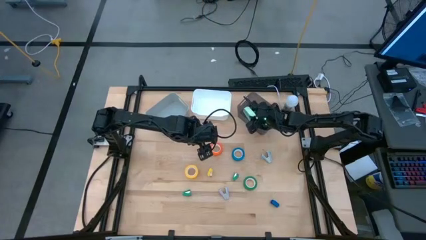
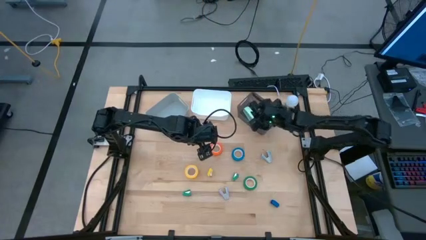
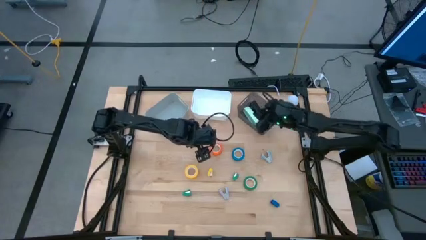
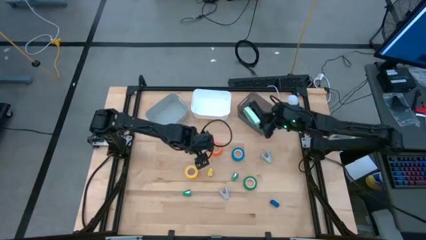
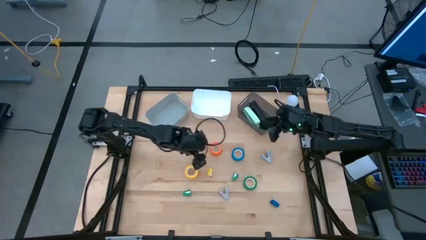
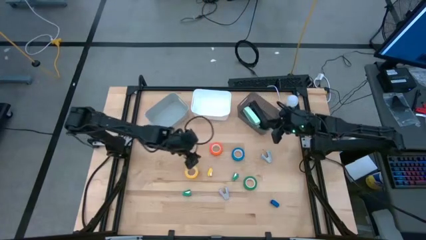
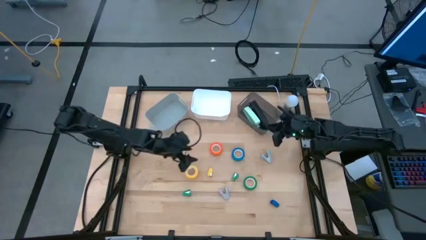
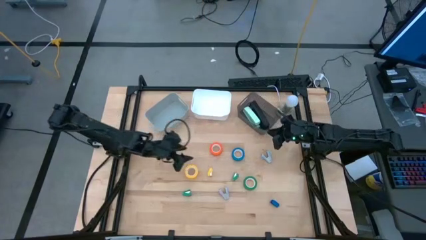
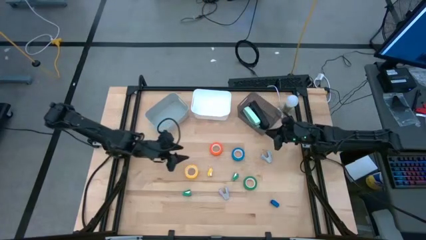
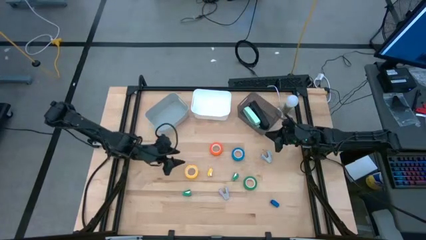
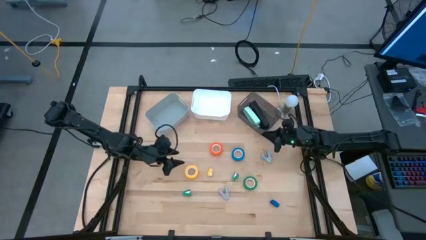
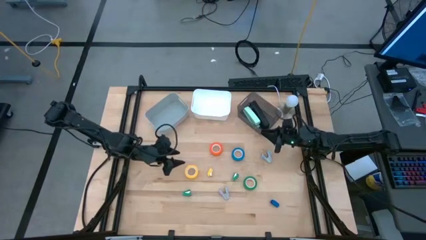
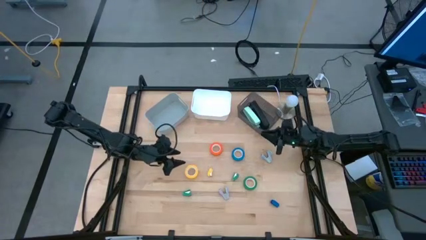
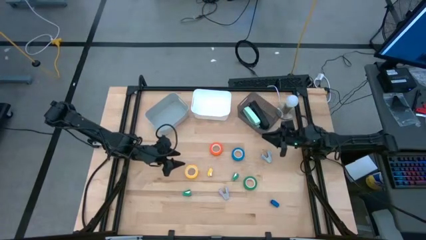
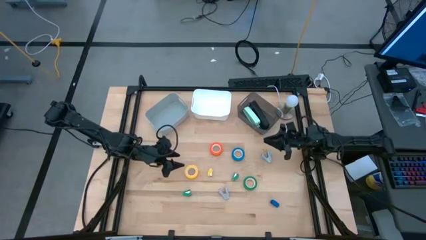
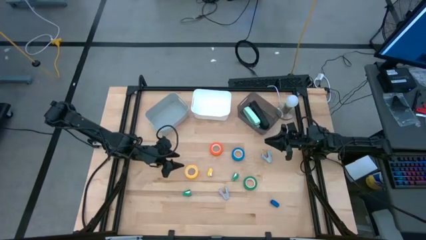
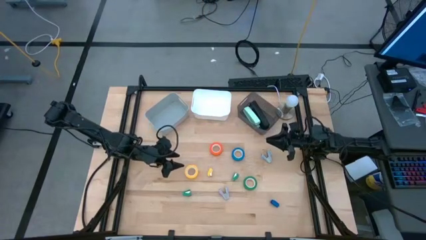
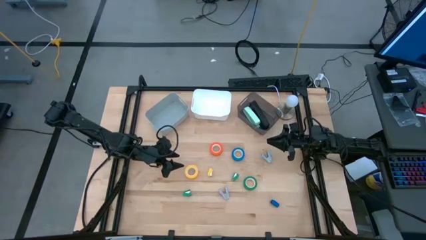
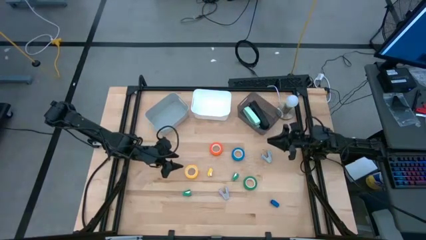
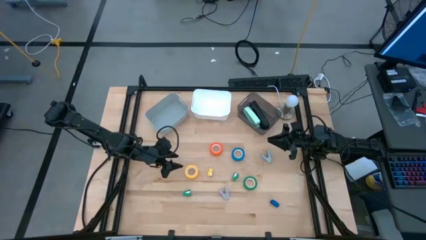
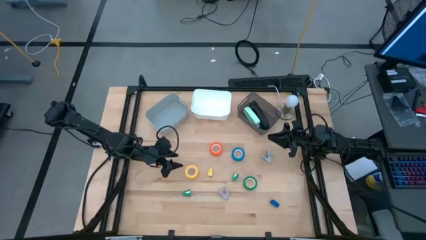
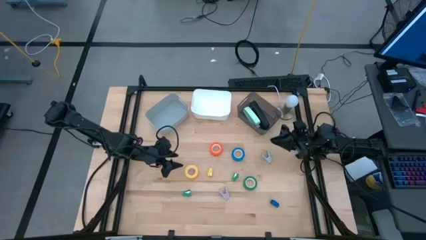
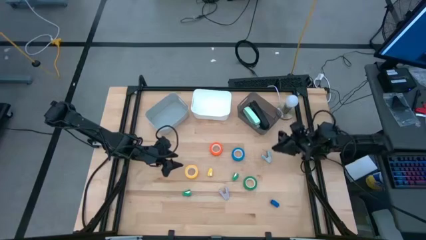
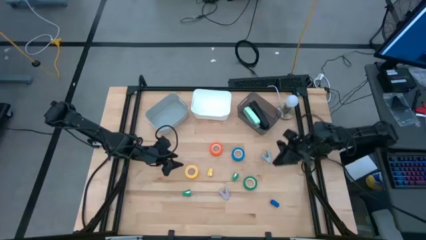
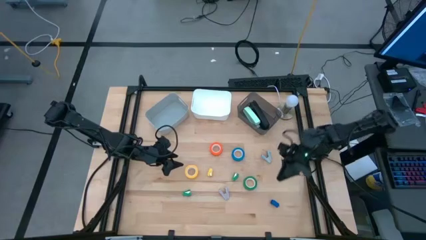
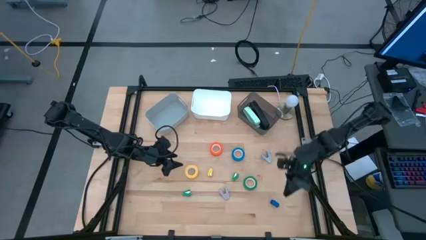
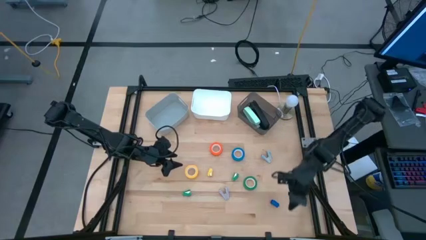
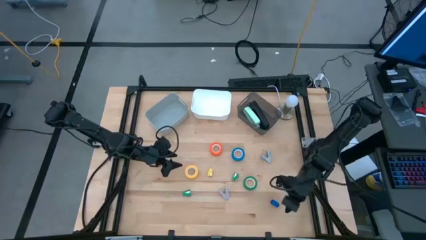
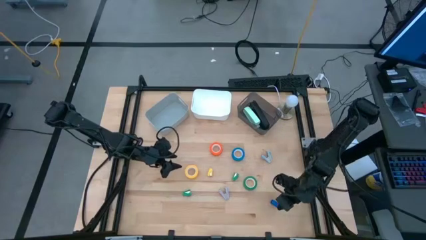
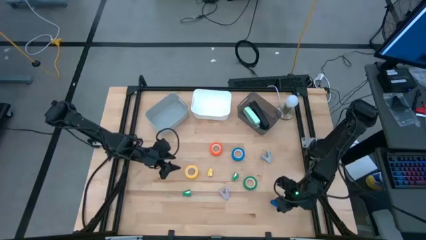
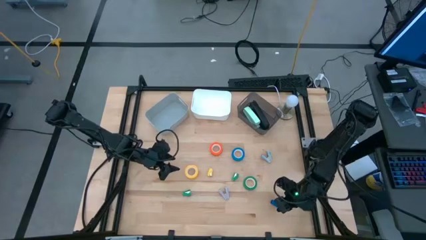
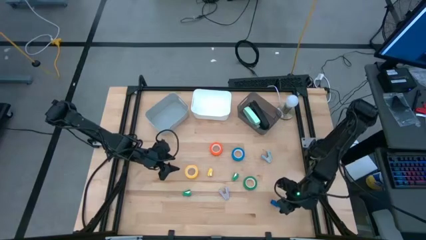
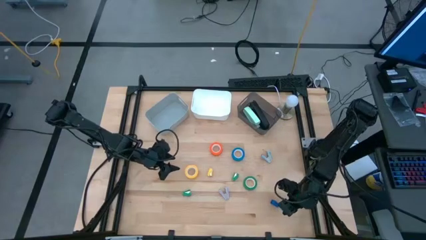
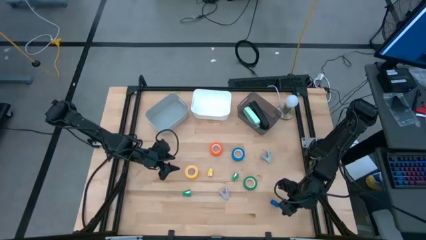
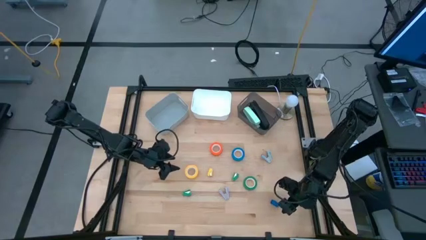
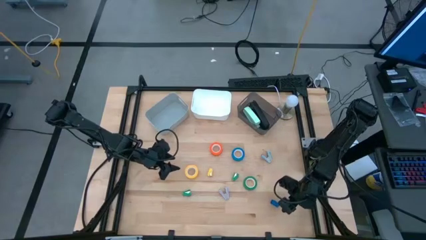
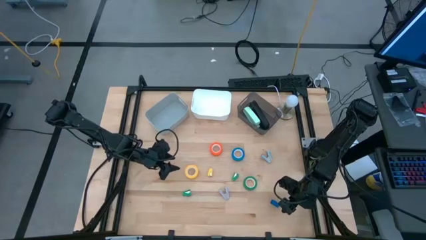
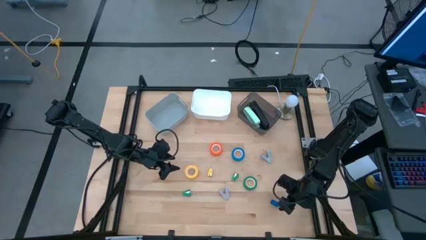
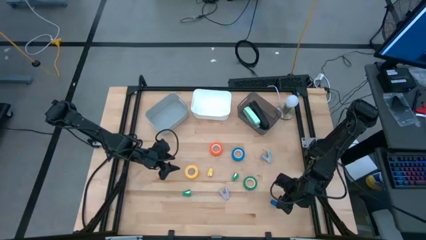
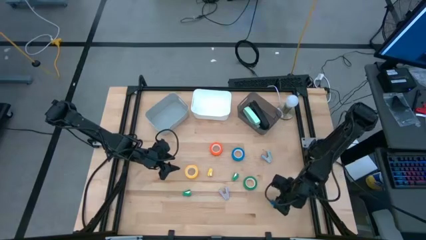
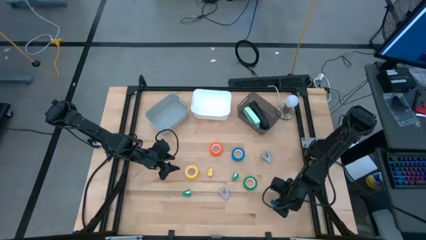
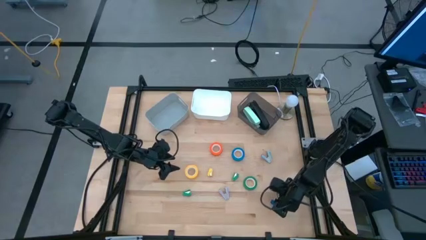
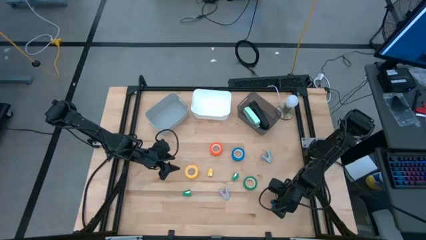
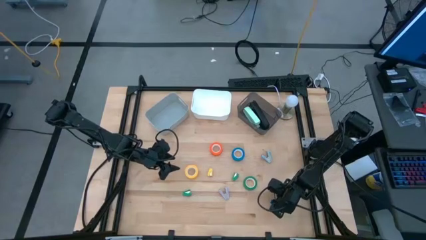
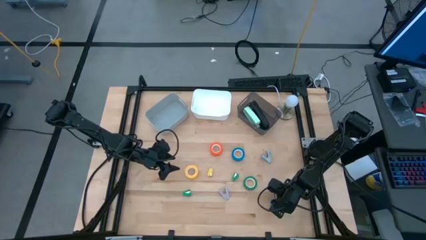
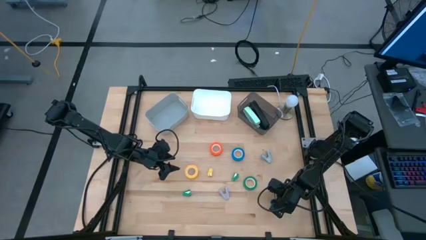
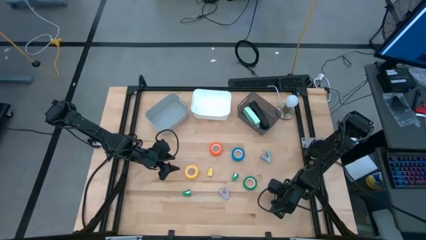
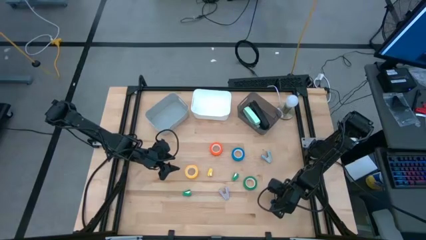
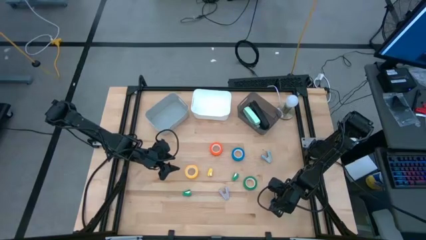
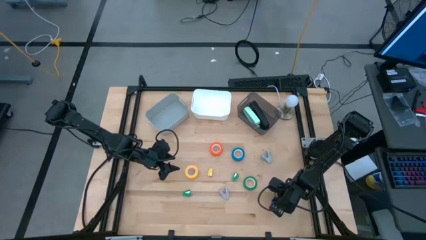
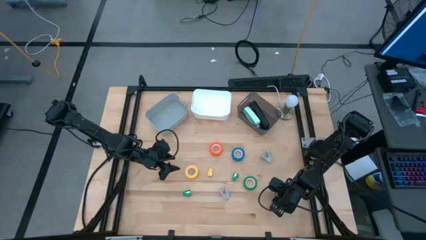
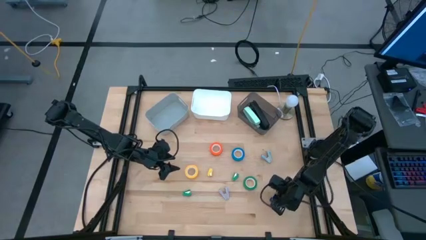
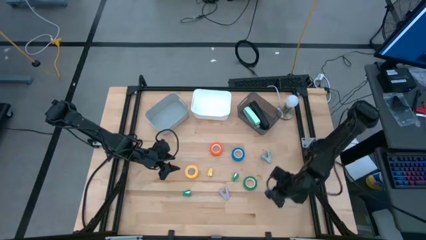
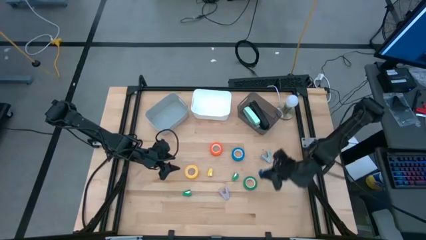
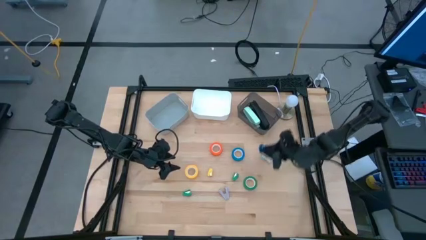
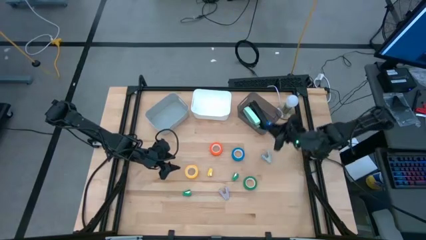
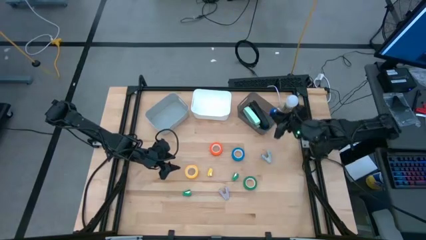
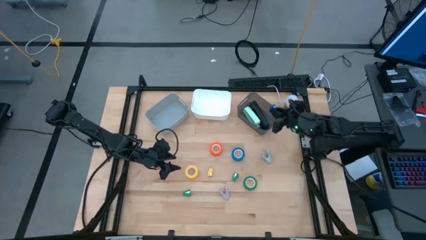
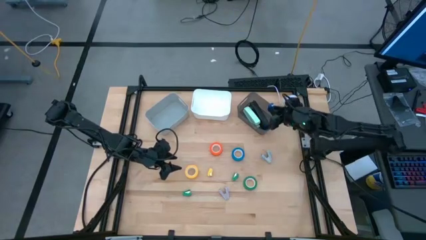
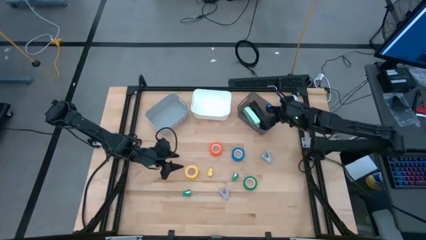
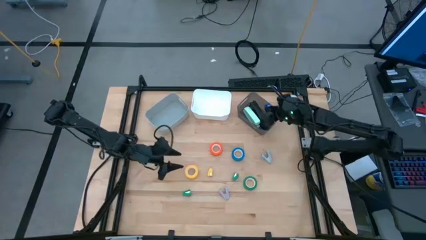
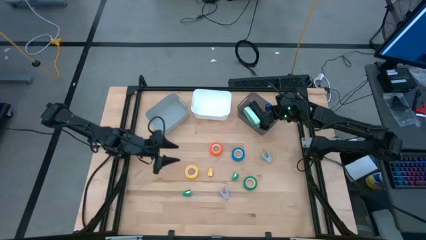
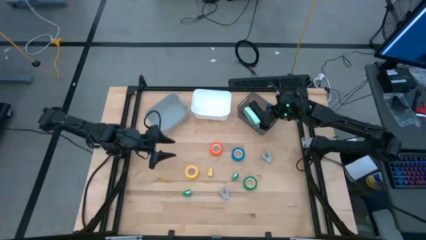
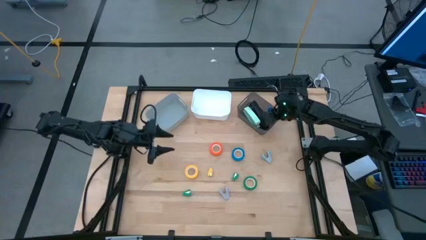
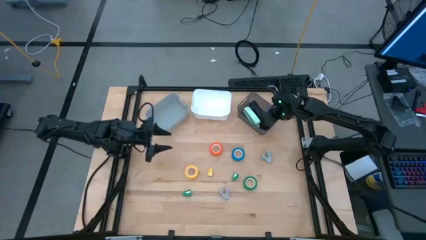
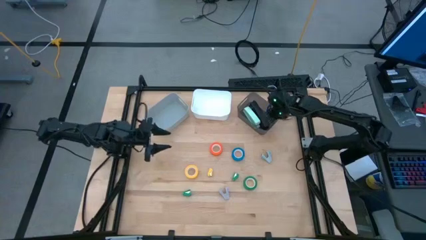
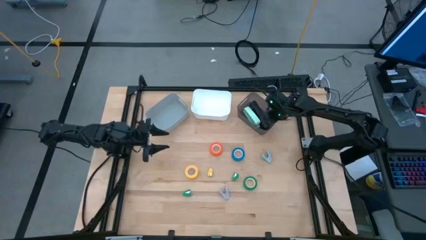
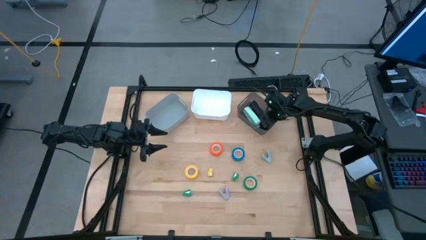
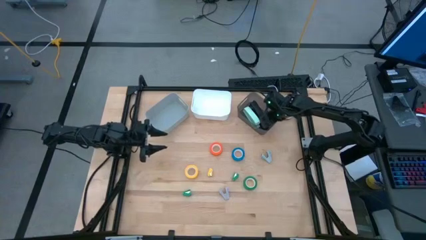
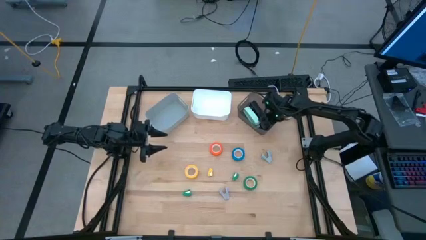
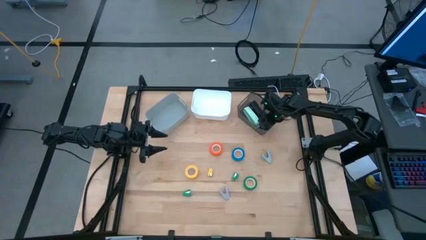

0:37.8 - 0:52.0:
Task: Pick and place Stapler, Stapler remover, tape
Put the small blue stapler into the black bin
